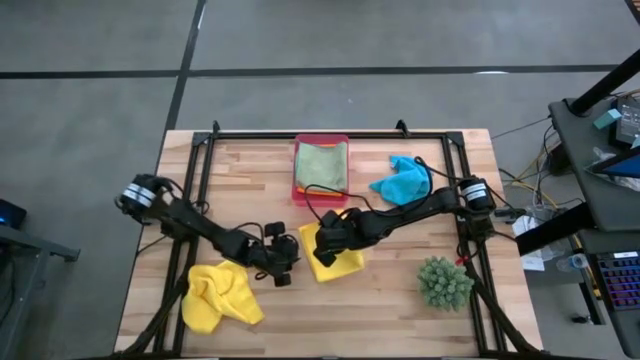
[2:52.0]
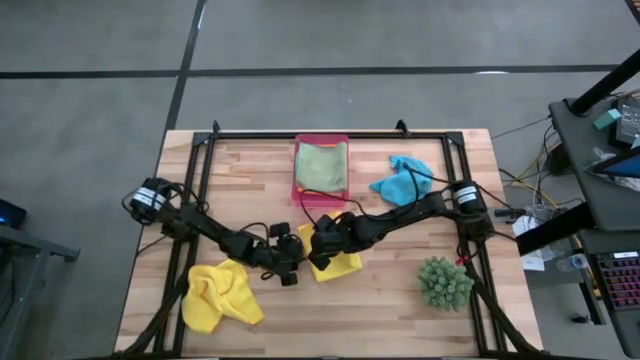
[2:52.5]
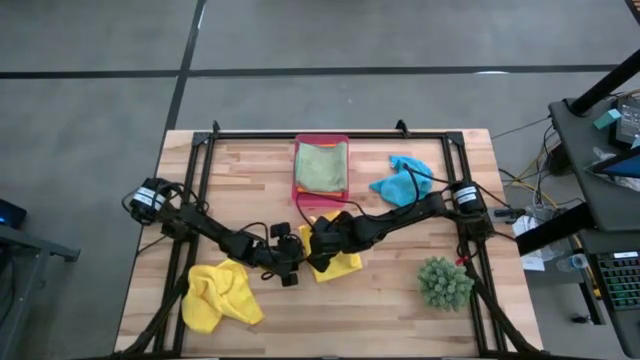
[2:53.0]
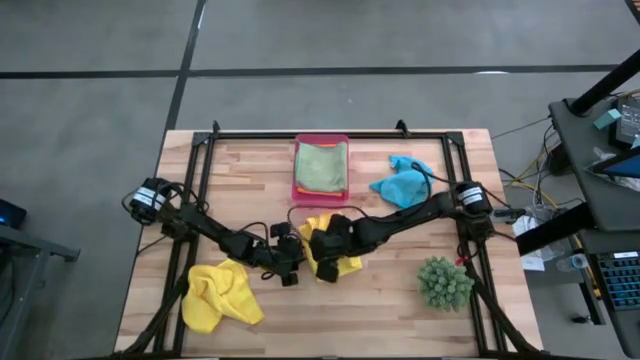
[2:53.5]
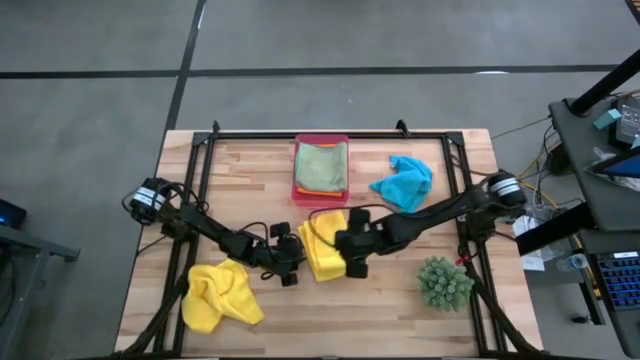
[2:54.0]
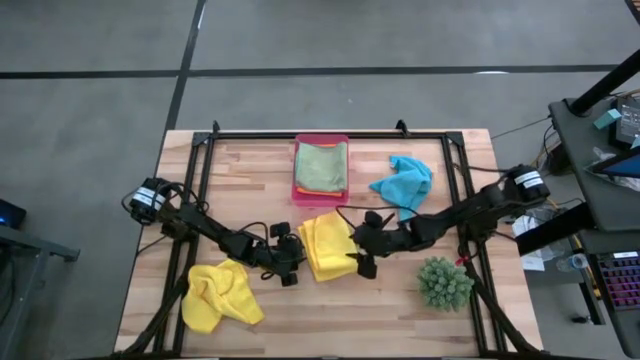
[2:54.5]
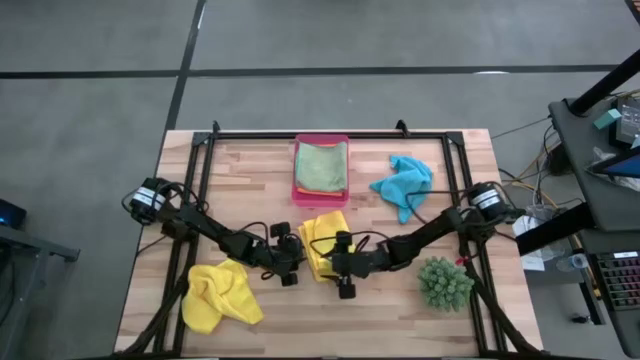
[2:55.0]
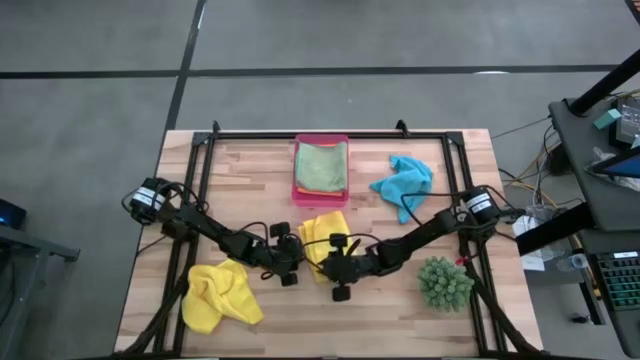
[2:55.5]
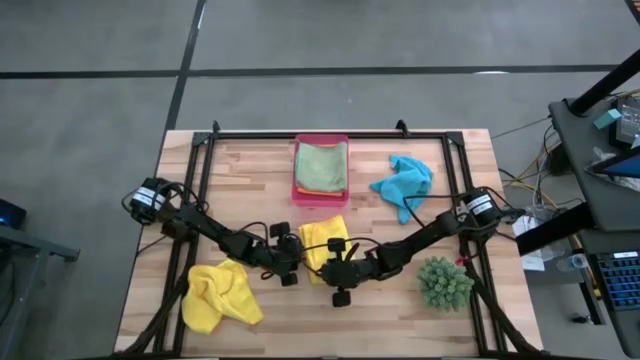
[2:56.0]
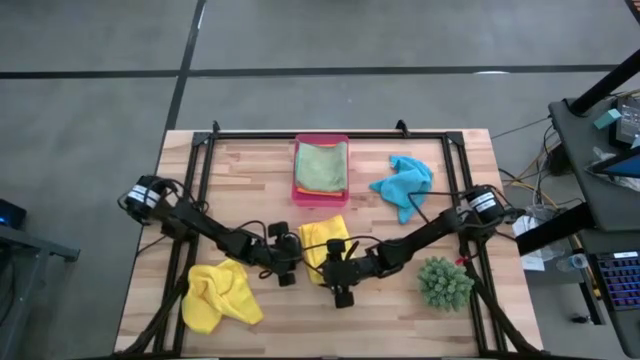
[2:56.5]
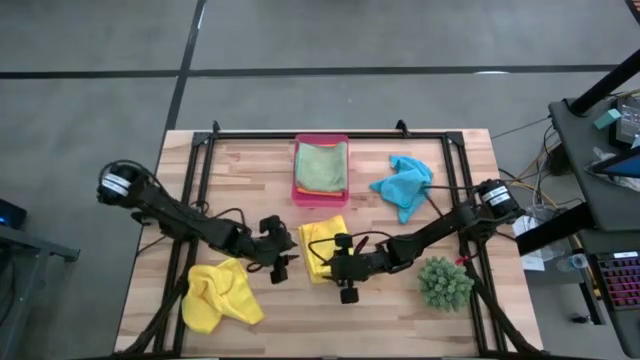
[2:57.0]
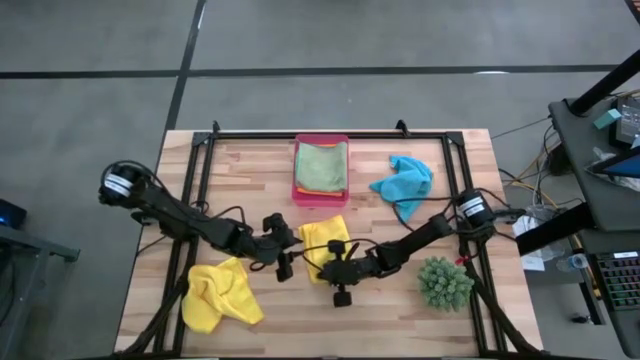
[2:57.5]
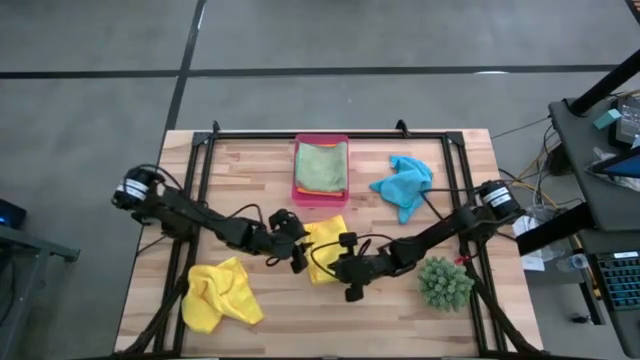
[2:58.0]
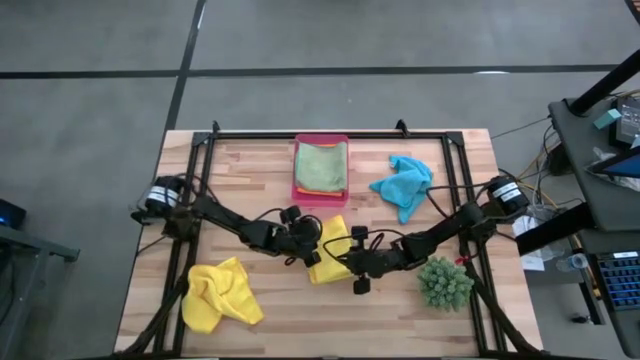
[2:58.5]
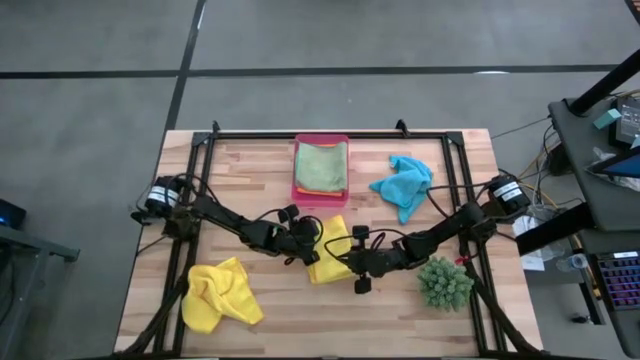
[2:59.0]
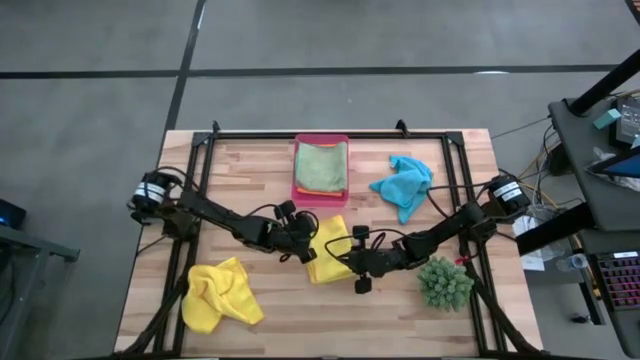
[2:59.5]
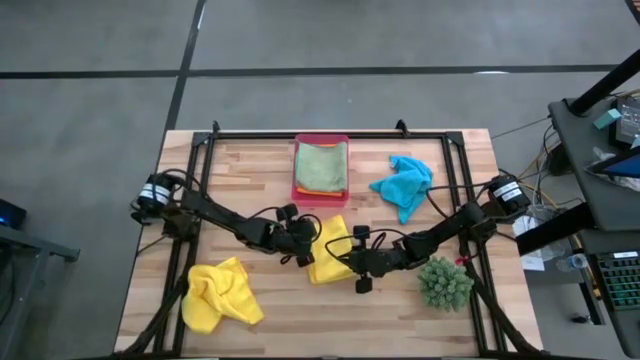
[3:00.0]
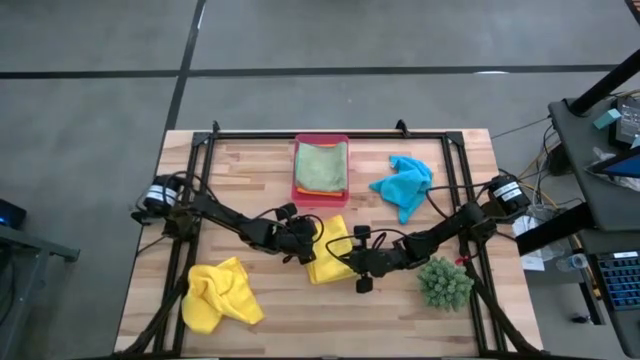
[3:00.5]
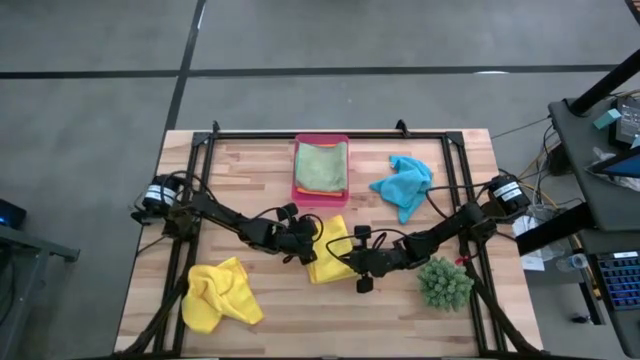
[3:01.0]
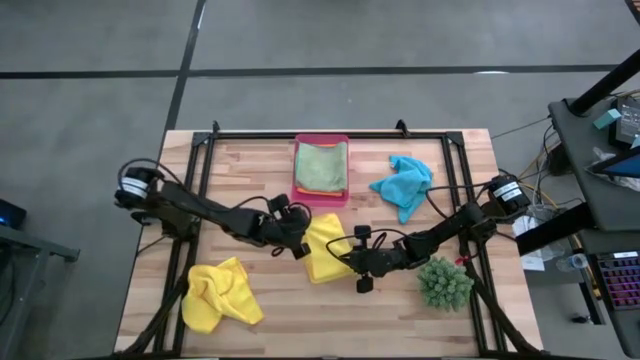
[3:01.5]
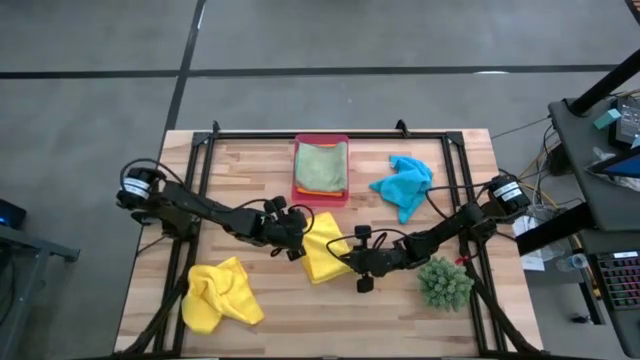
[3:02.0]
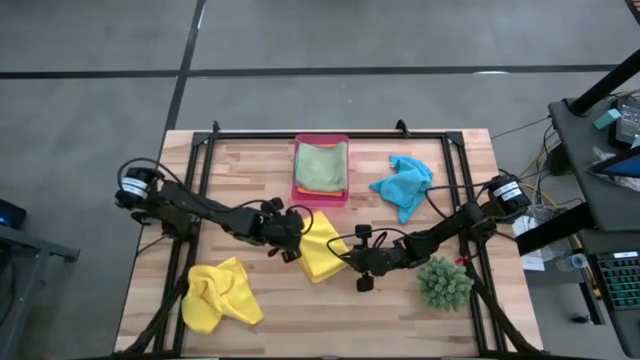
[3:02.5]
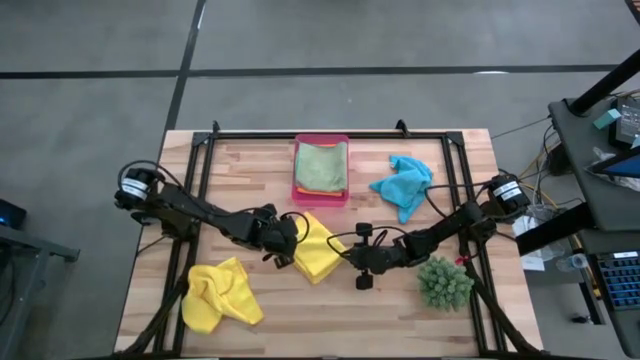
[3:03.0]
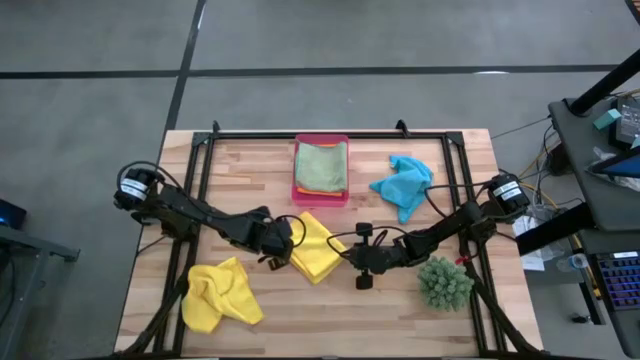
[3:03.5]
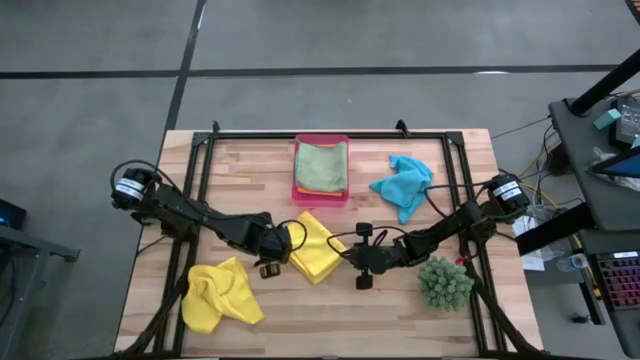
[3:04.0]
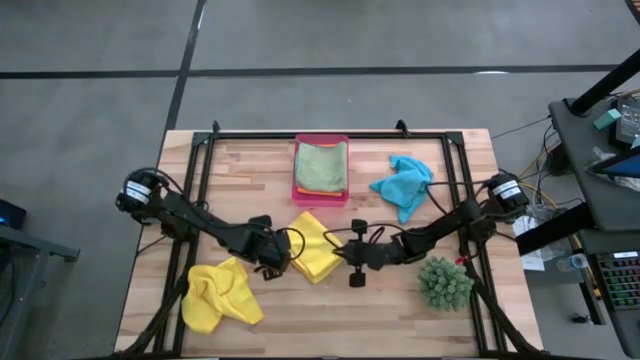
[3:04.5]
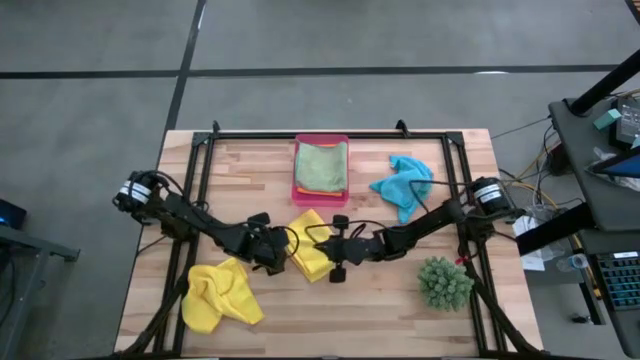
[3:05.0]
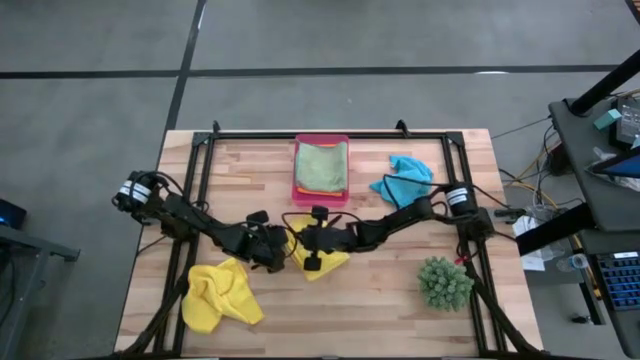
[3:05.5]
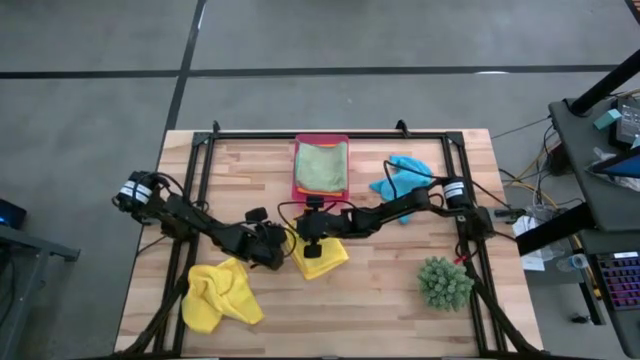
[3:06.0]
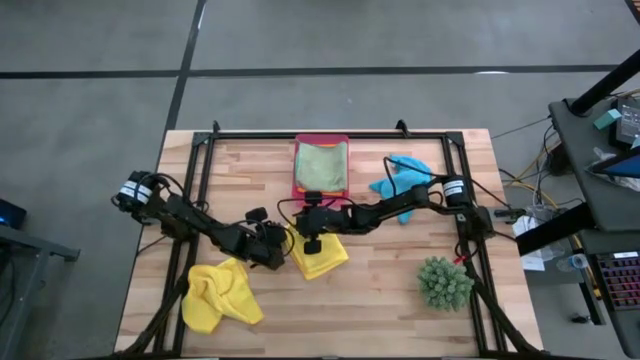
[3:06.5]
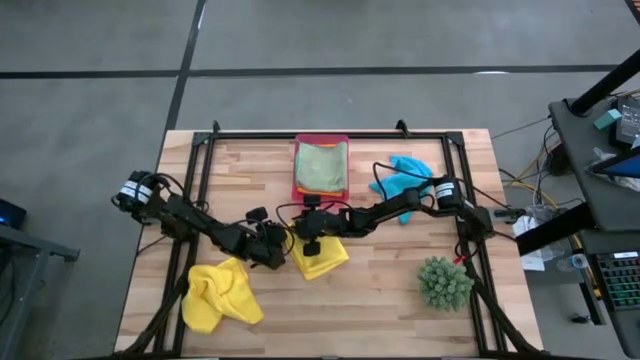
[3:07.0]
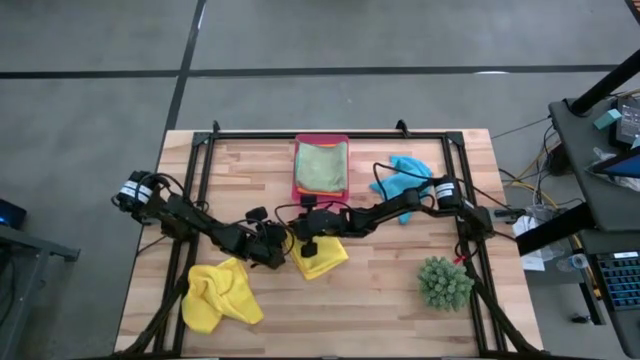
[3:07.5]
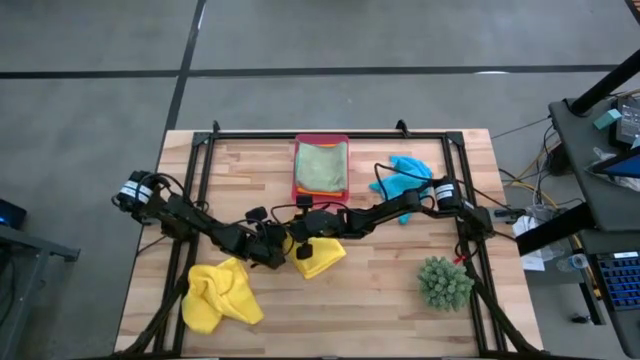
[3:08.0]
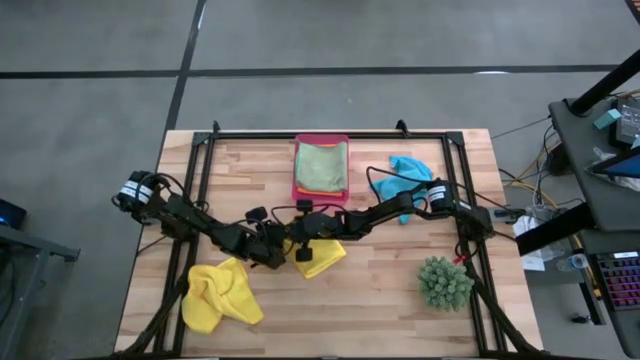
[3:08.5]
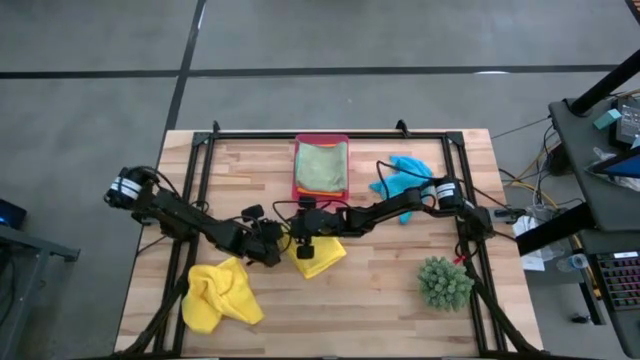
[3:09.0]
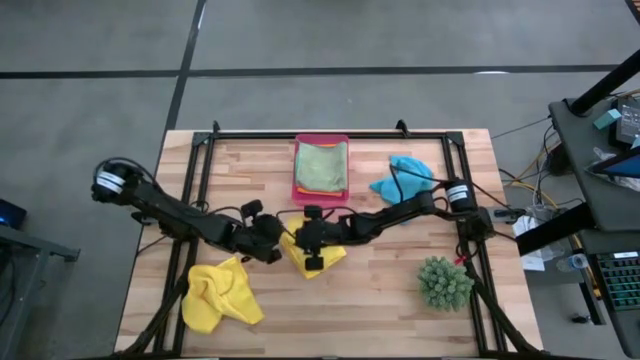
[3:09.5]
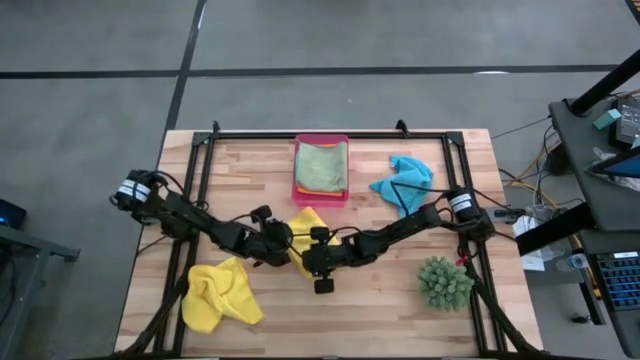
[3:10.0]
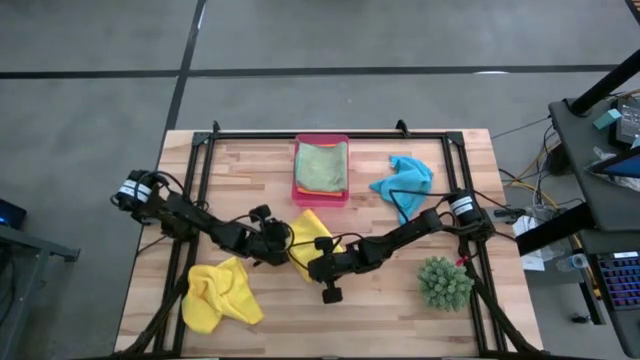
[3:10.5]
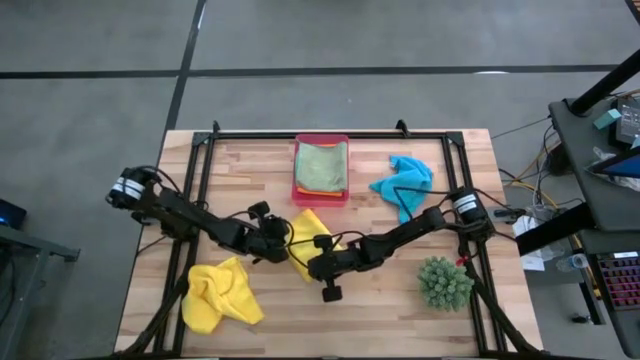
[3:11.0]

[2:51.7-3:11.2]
Task: Fold microfiber towels
Fold the top yellow towel
